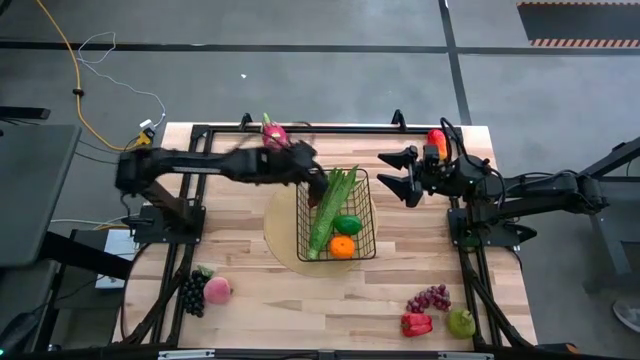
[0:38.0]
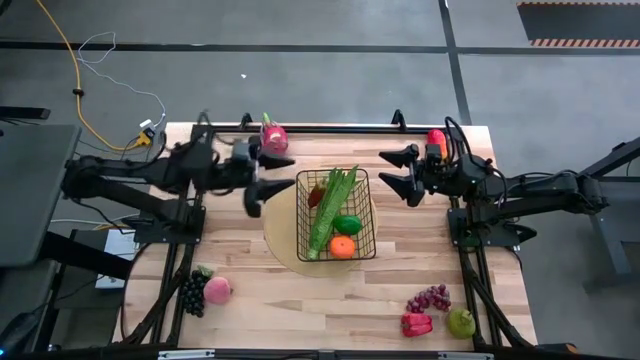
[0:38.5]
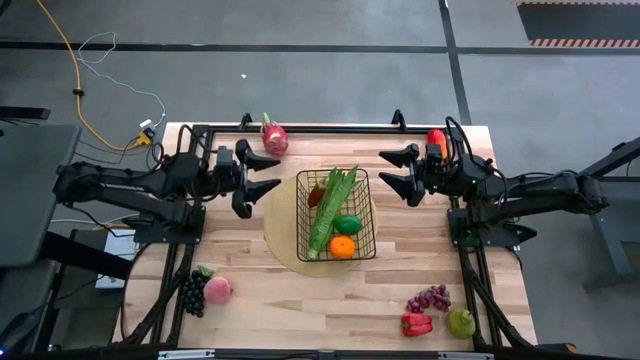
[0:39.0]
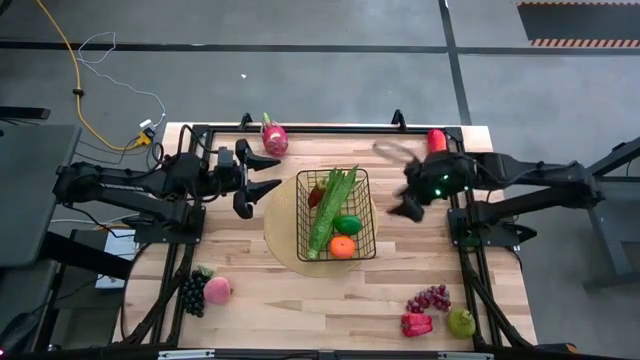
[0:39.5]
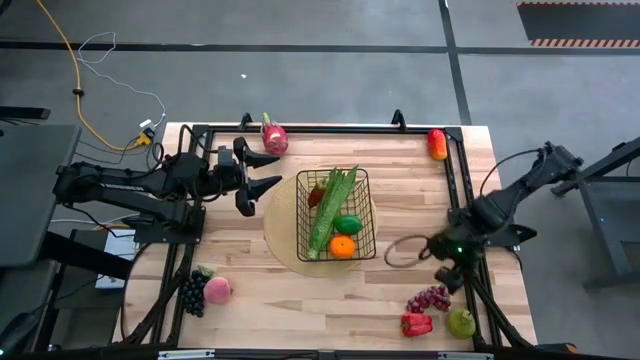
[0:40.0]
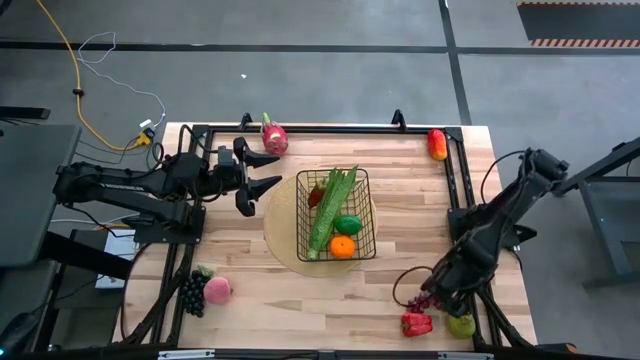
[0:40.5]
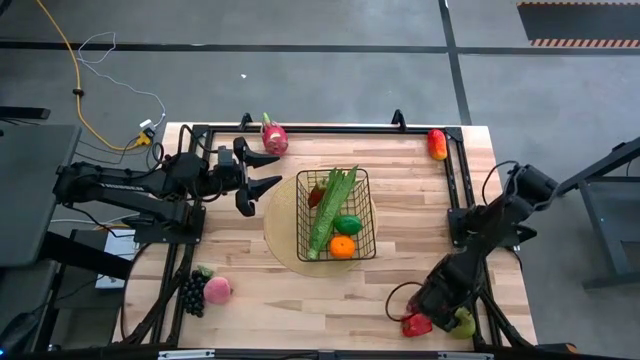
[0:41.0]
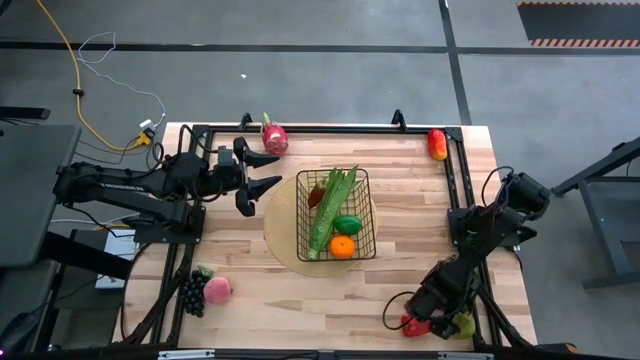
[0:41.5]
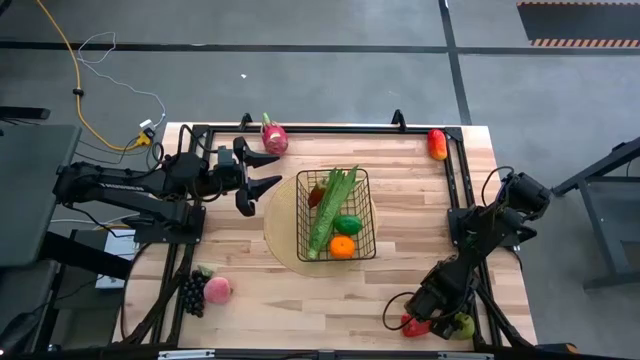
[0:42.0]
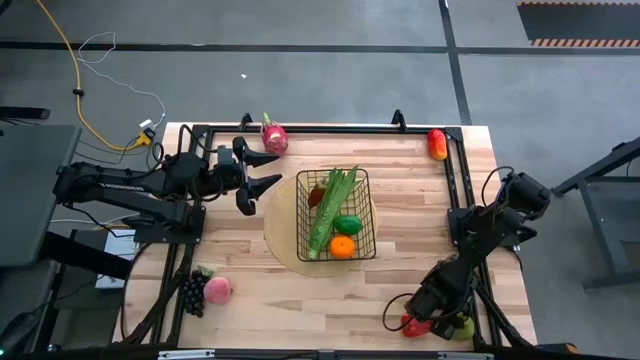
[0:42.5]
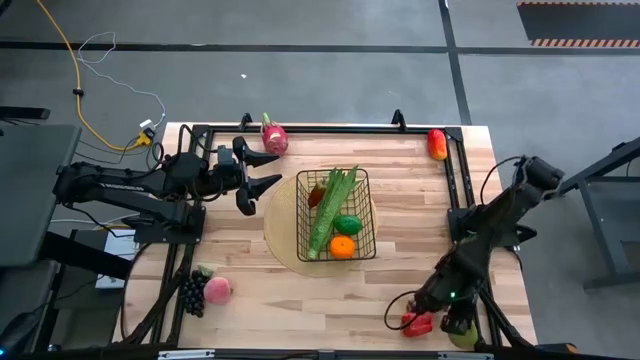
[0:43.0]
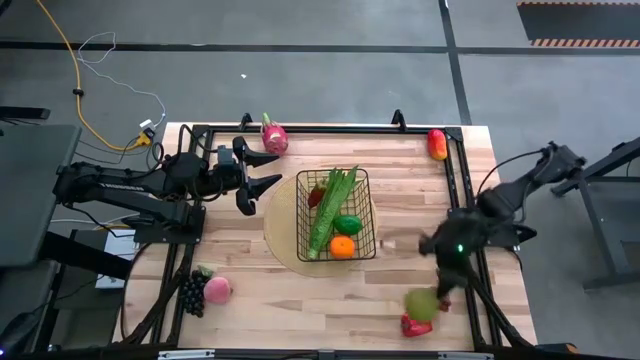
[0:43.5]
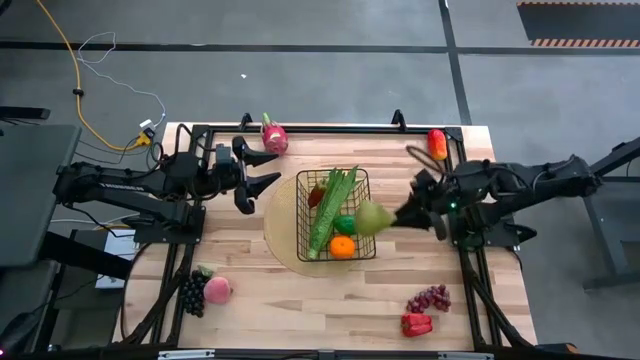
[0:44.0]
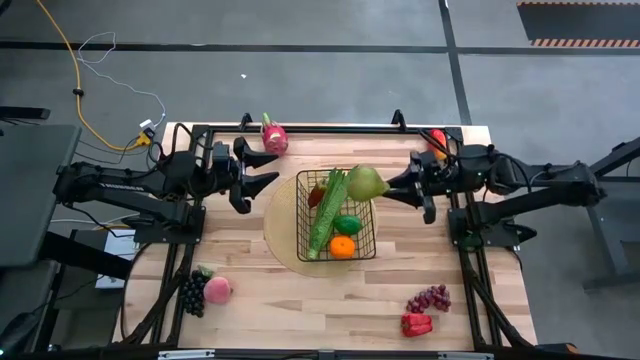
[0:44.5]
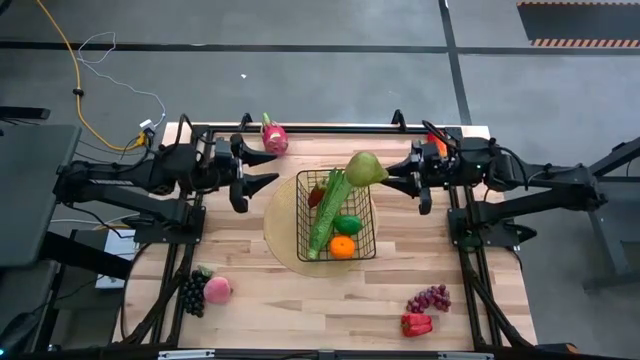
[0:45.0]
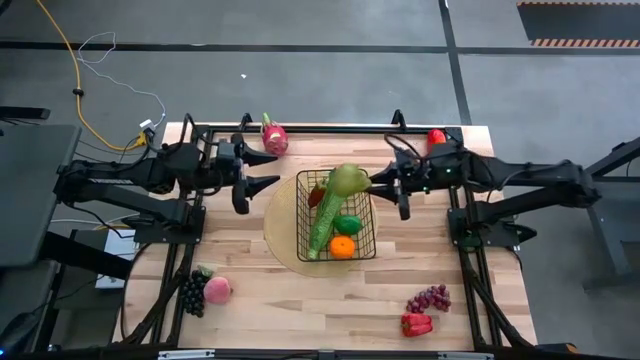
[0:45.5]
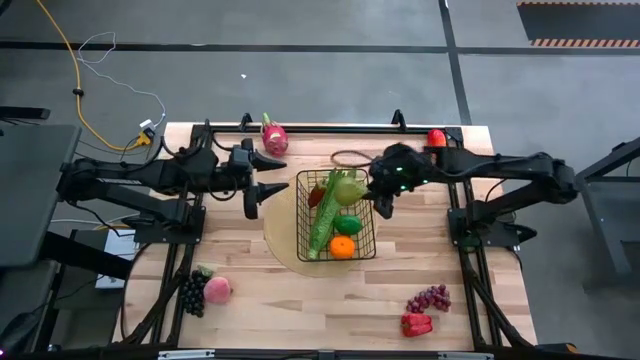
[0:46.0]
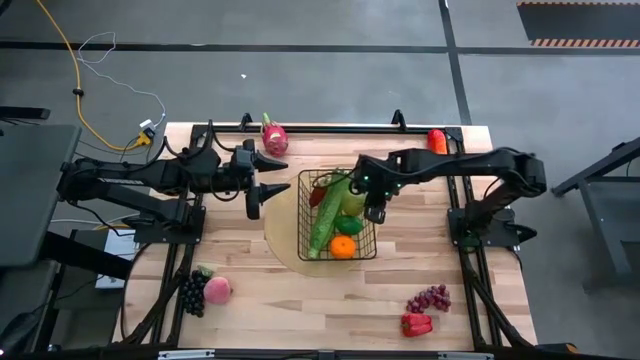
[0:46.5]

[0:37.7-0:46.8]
Task: Build produce basket
Put the pear into the wire basket

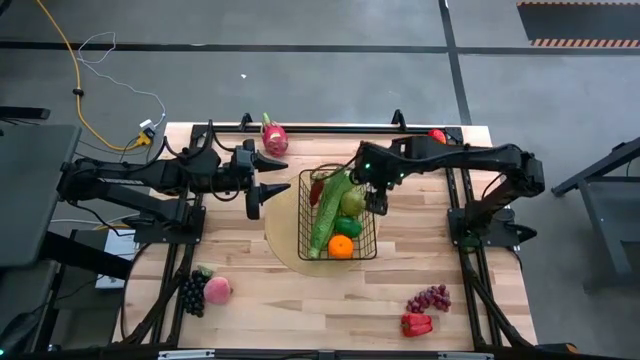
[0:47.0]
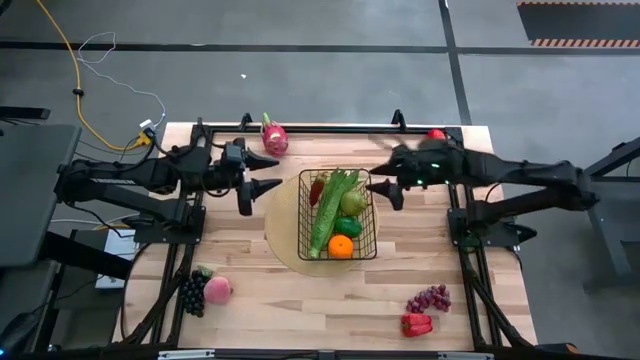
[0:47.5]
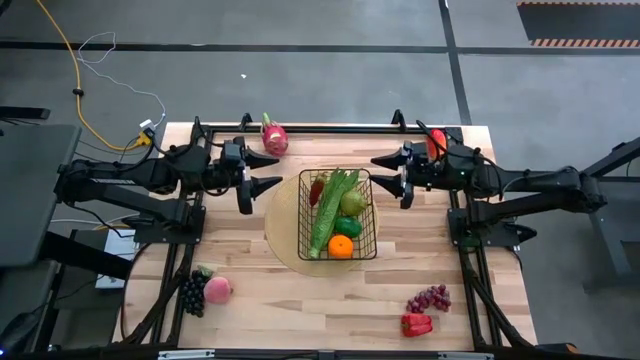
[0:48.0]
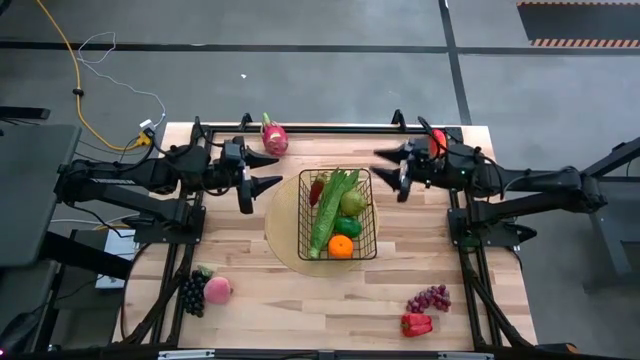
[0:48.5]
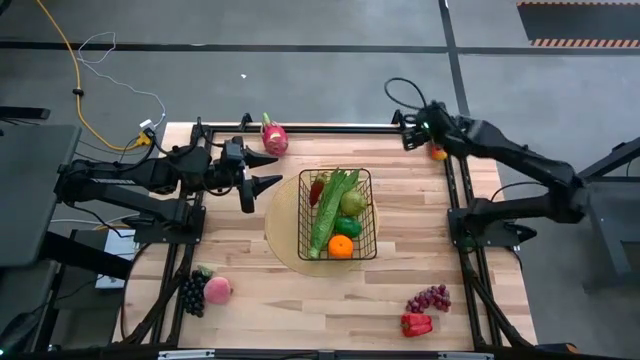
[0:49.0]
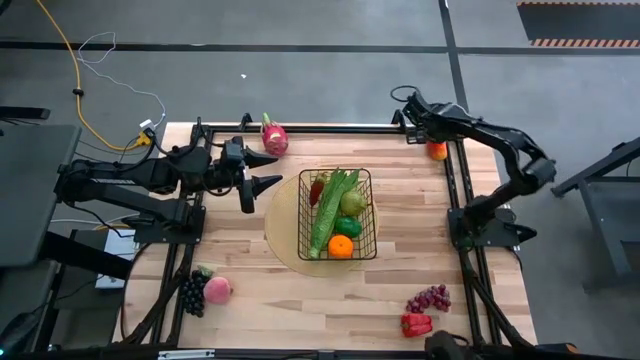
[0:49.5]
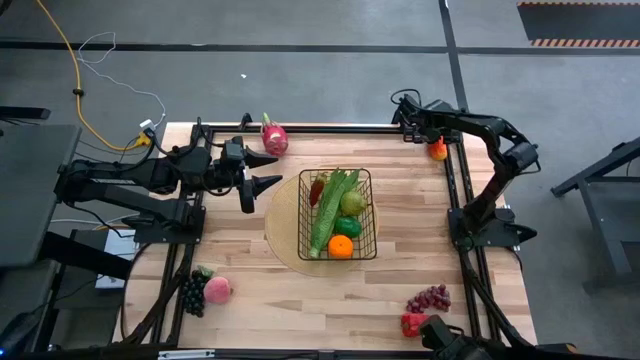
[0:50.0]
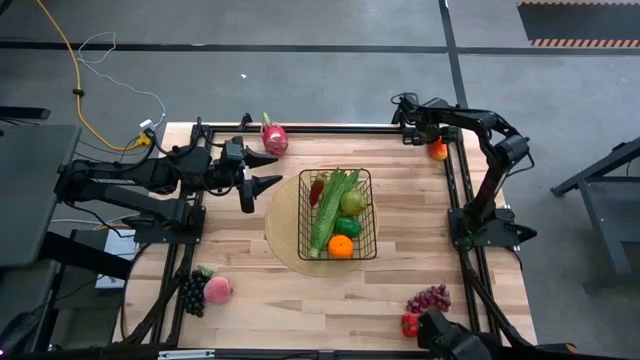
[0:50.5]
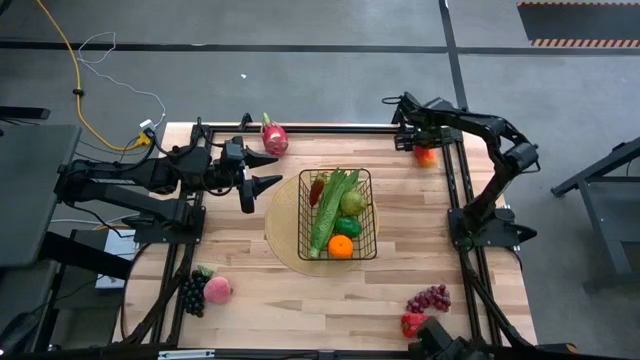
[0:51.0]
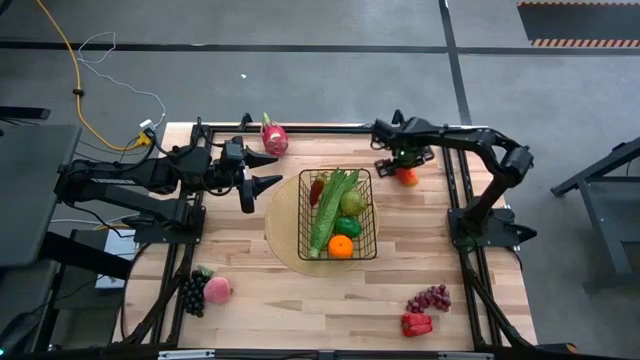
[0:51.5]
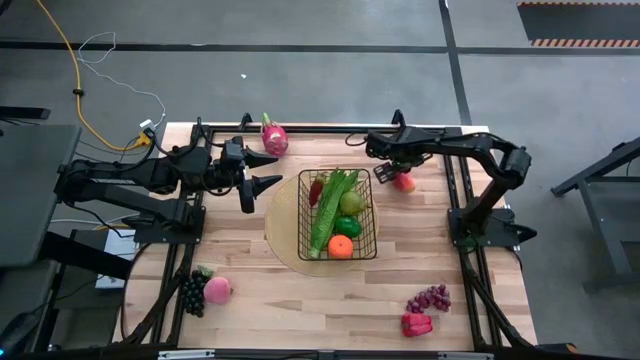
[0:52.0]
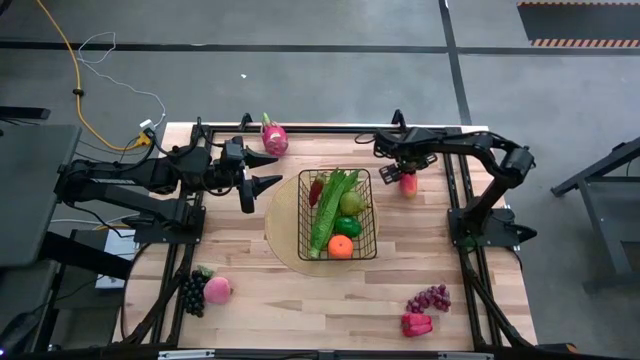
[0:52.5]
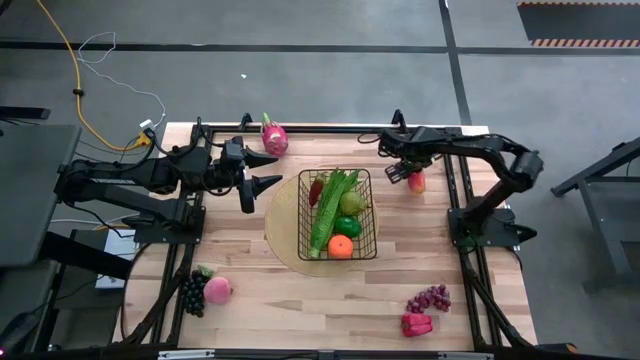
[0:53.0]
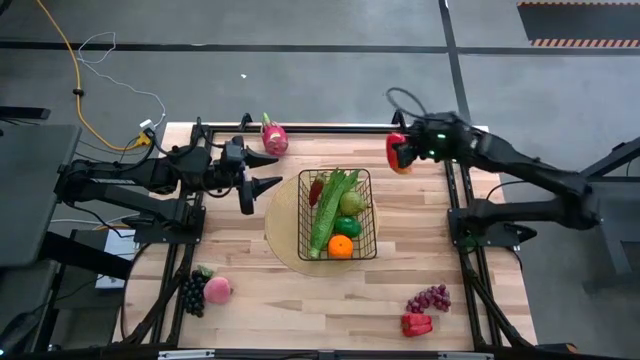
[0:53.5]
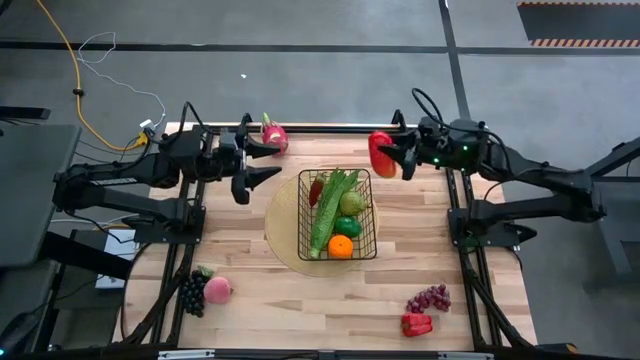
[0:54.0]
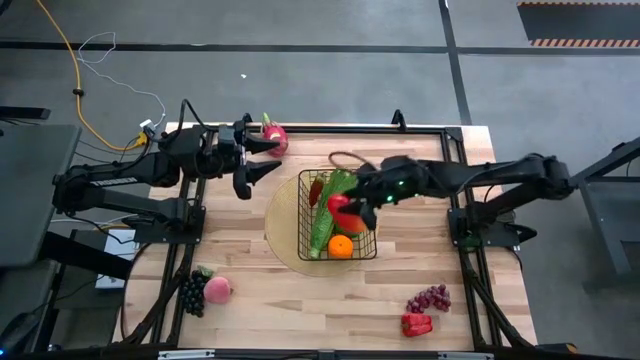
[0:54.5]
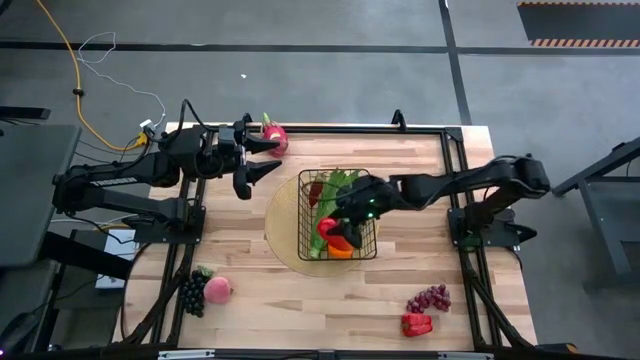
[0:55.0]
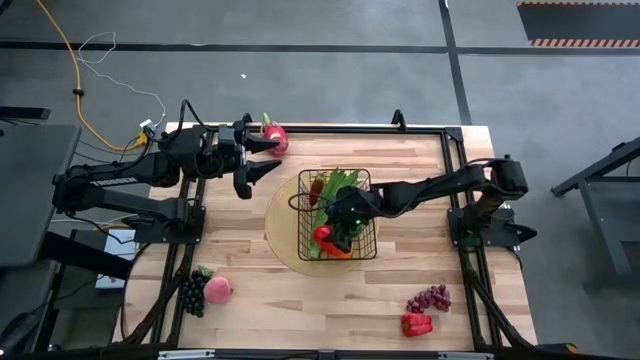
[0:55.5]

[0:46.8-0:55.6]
Put the mango into the wire basket

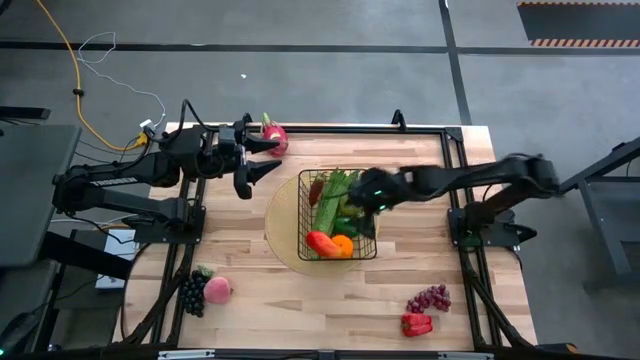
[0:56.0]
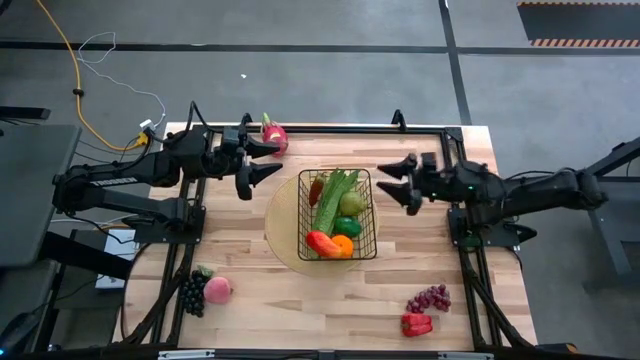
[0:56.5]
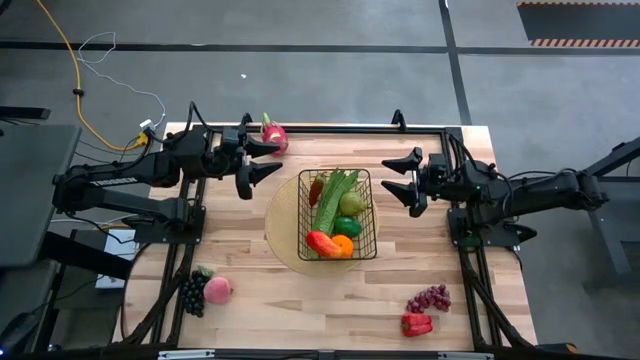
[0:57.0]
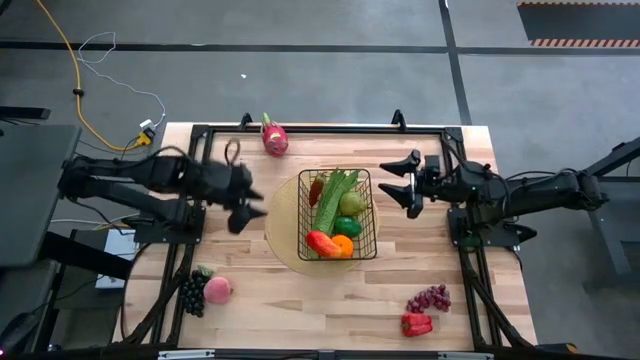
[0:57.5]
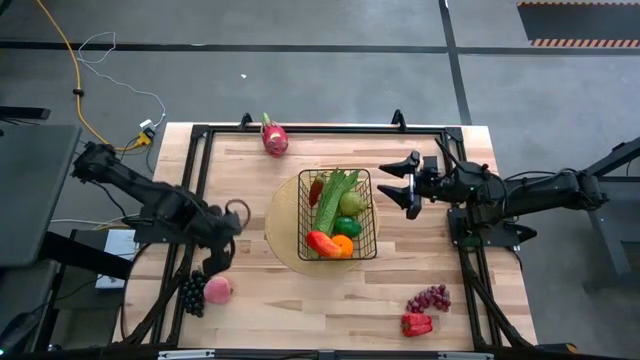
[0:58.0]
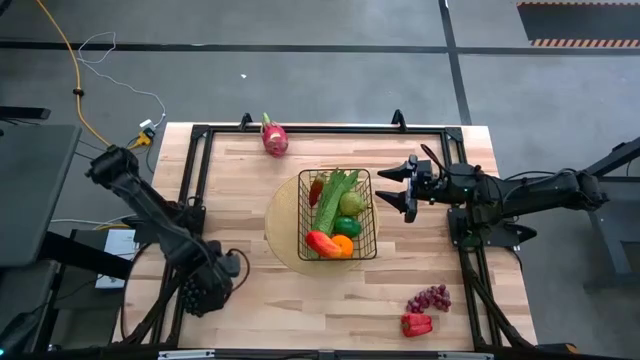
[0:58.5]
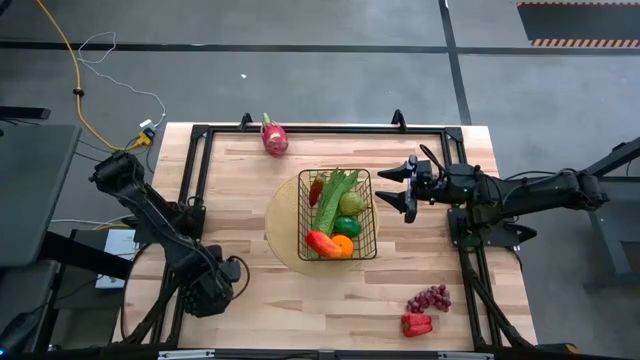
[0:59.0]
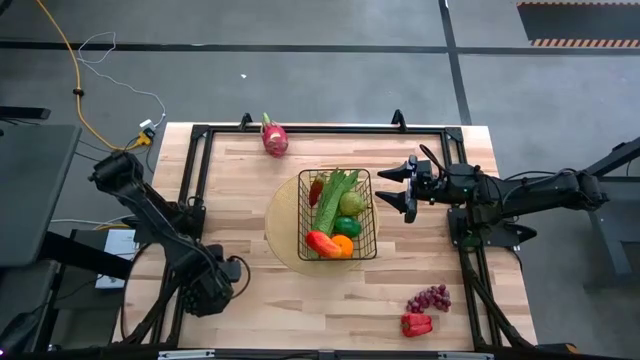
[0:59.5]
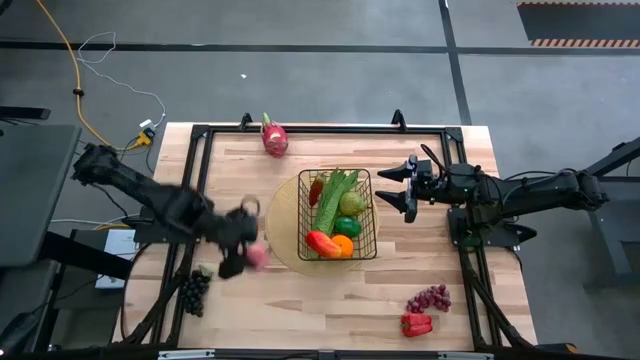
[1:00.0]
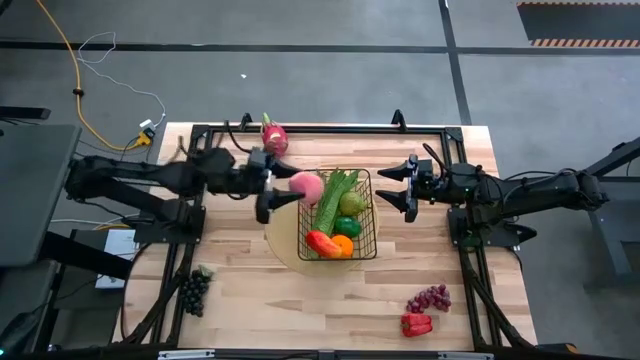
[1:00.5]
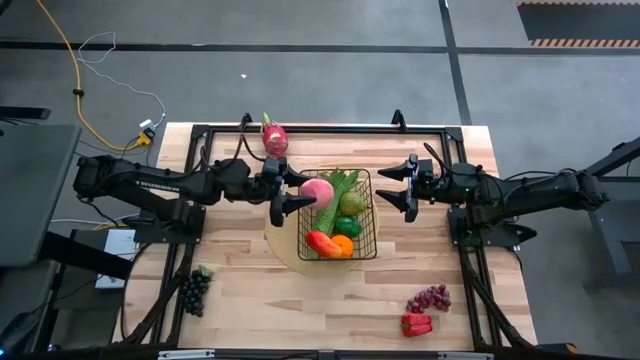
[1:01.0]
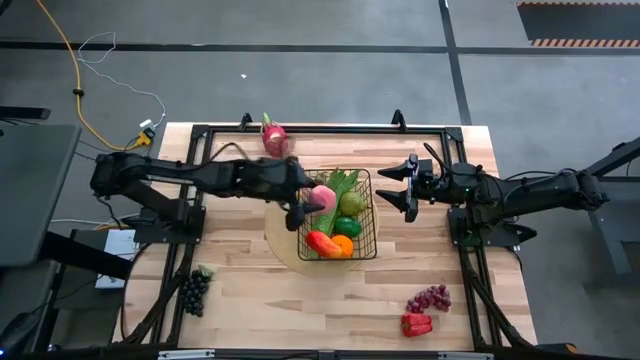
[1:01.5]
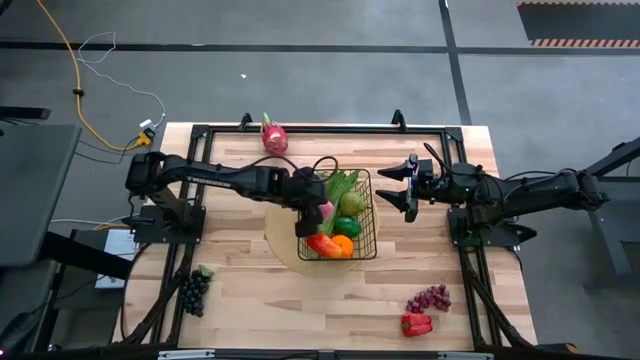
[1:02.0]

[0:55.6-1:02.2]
Put the peach into the wire basket
